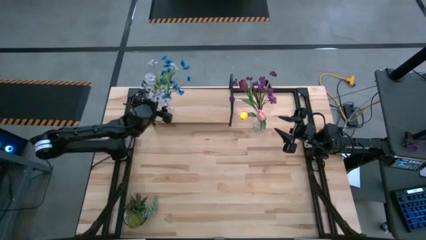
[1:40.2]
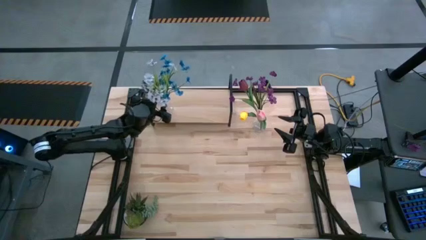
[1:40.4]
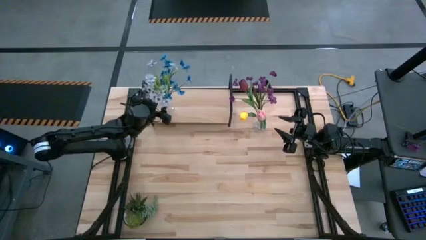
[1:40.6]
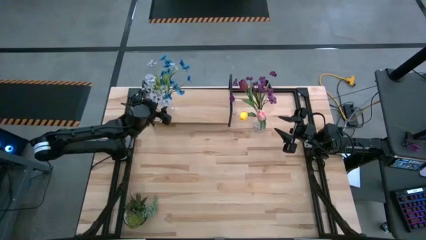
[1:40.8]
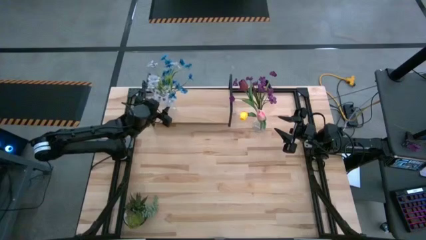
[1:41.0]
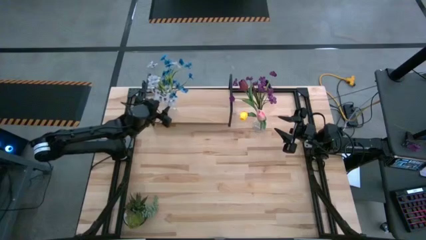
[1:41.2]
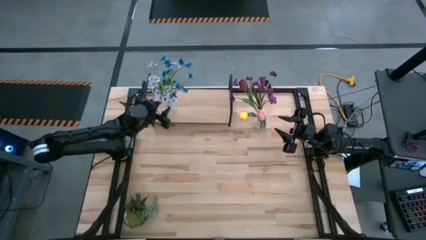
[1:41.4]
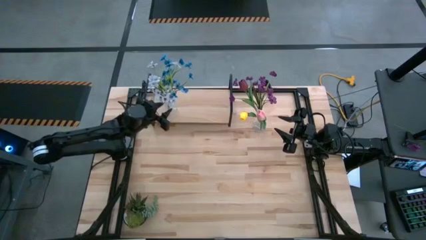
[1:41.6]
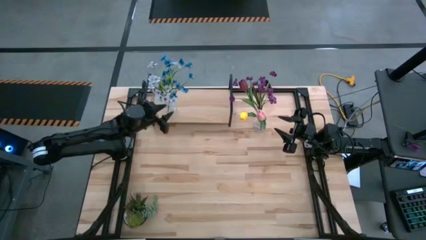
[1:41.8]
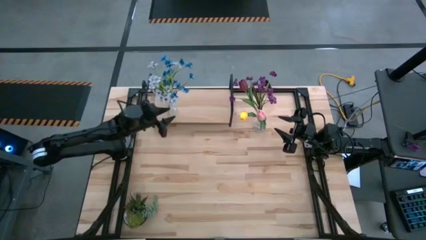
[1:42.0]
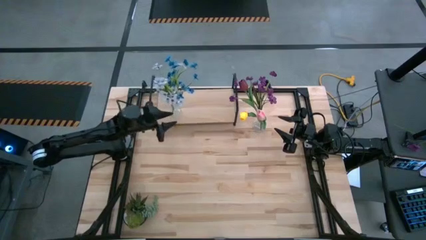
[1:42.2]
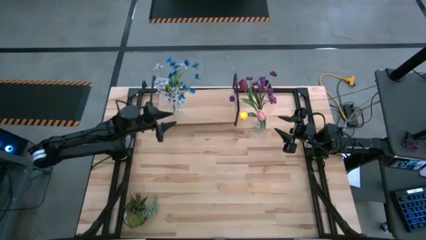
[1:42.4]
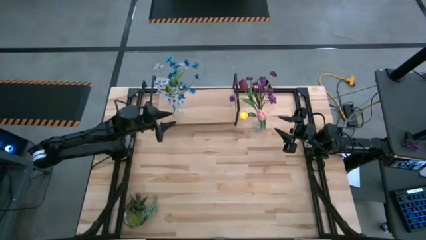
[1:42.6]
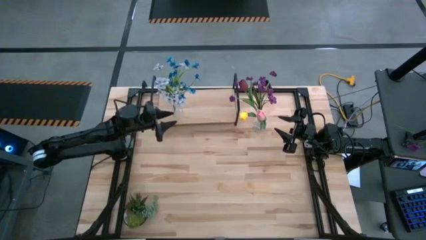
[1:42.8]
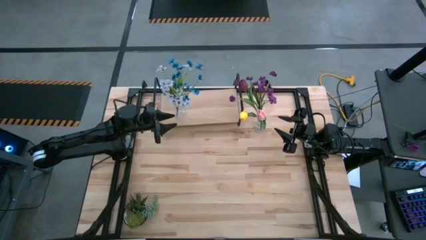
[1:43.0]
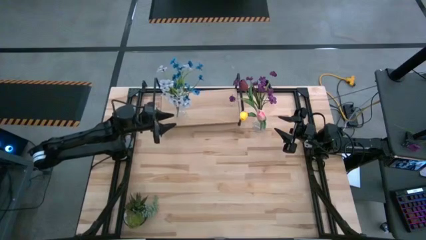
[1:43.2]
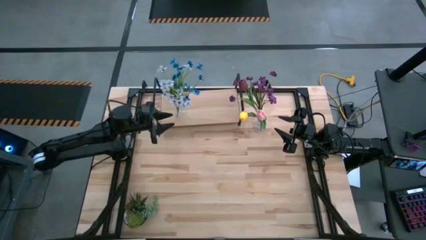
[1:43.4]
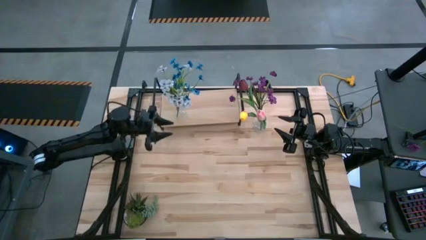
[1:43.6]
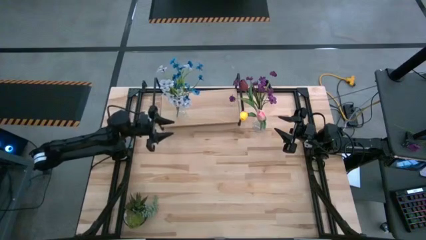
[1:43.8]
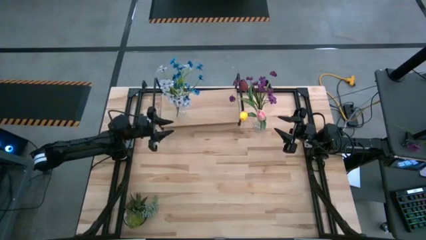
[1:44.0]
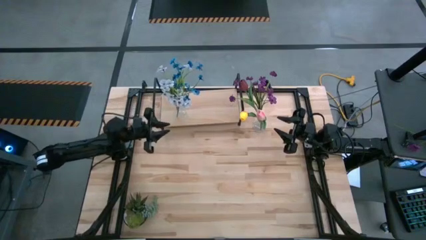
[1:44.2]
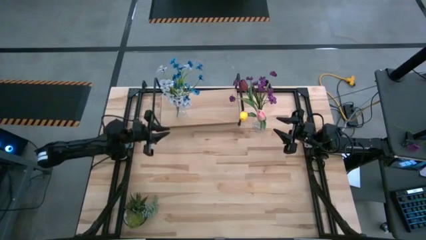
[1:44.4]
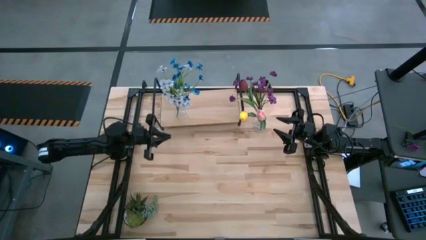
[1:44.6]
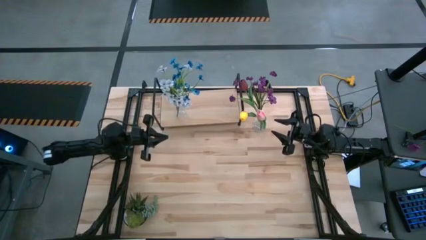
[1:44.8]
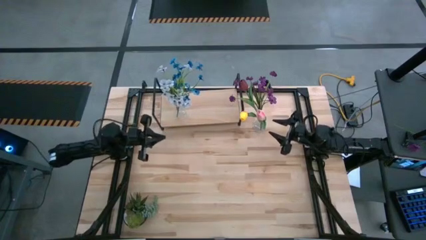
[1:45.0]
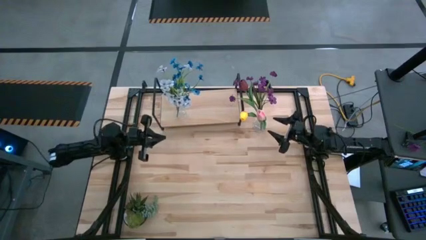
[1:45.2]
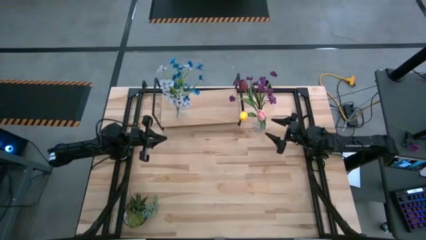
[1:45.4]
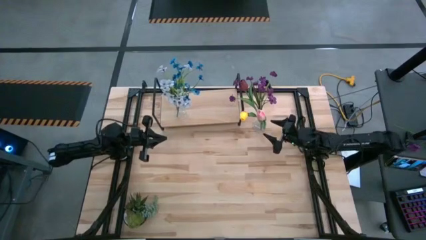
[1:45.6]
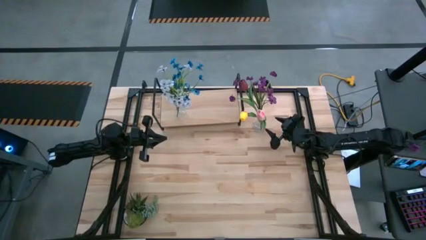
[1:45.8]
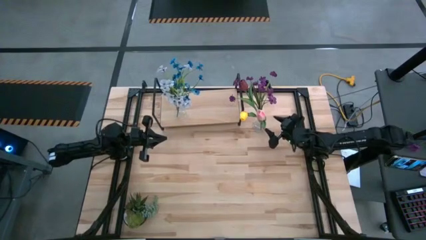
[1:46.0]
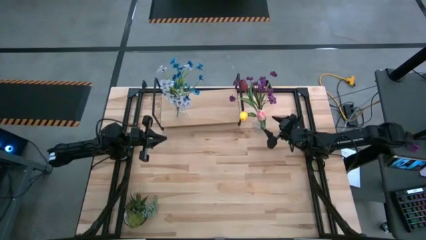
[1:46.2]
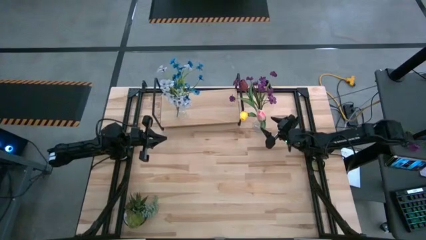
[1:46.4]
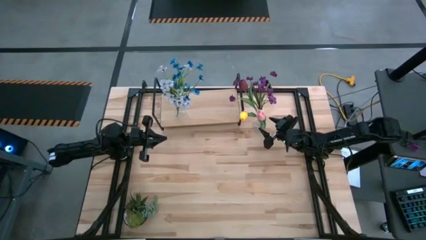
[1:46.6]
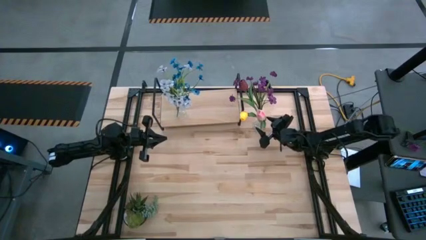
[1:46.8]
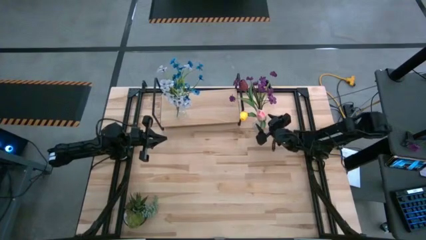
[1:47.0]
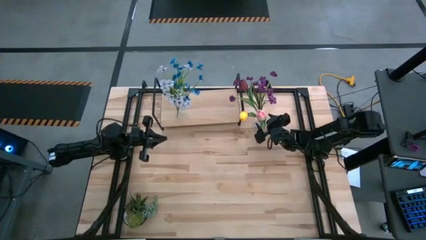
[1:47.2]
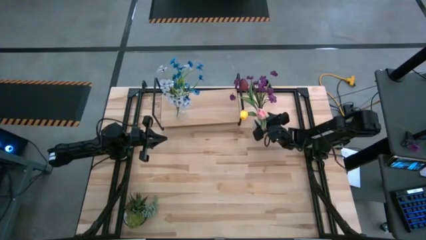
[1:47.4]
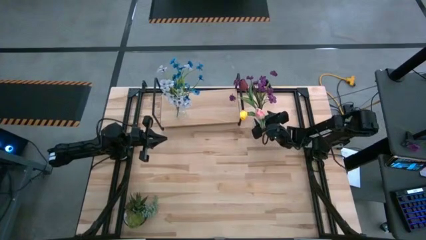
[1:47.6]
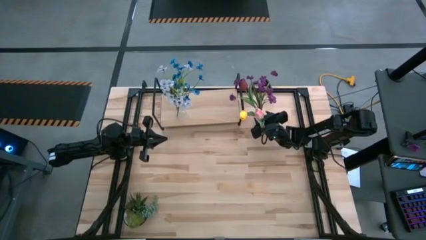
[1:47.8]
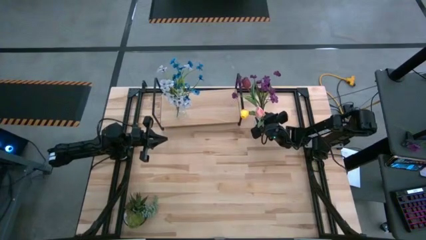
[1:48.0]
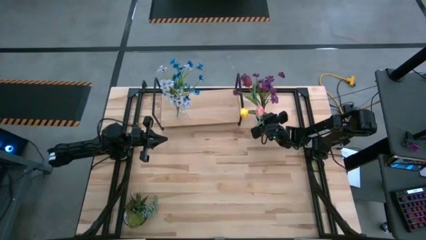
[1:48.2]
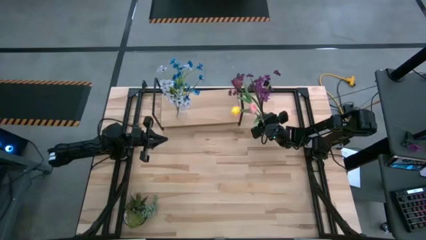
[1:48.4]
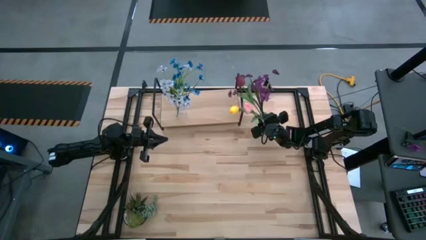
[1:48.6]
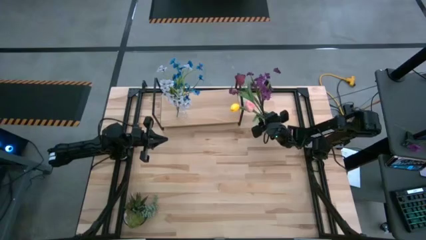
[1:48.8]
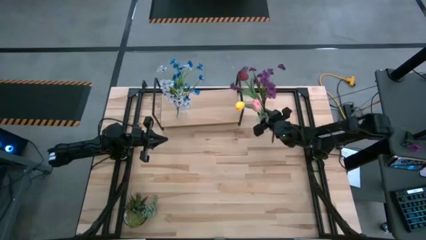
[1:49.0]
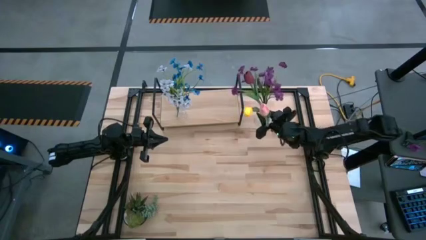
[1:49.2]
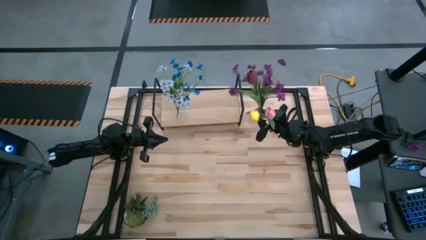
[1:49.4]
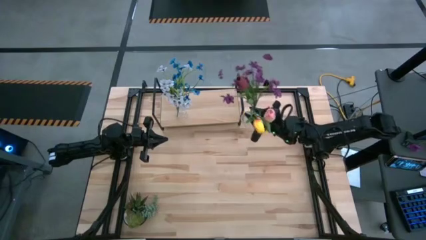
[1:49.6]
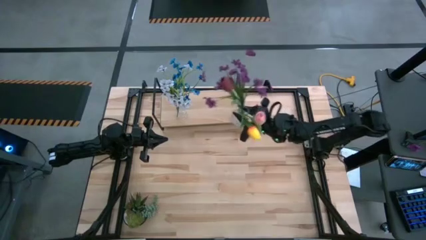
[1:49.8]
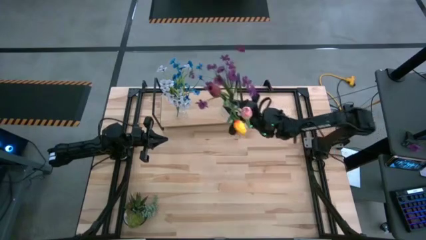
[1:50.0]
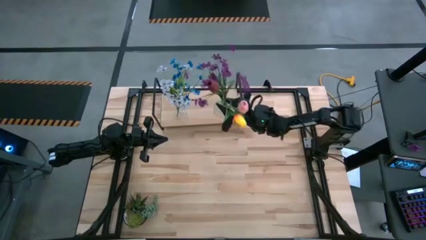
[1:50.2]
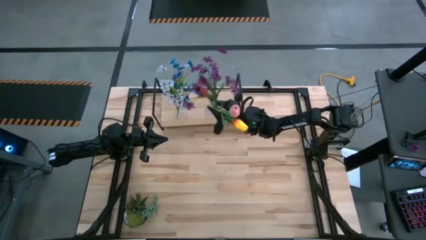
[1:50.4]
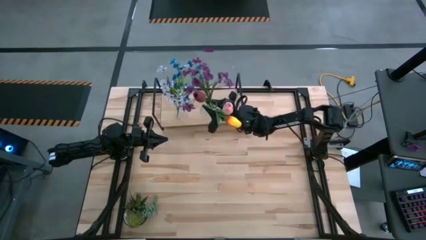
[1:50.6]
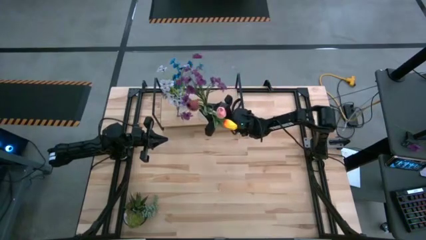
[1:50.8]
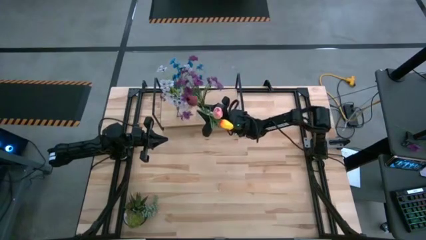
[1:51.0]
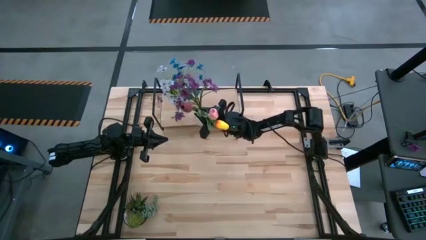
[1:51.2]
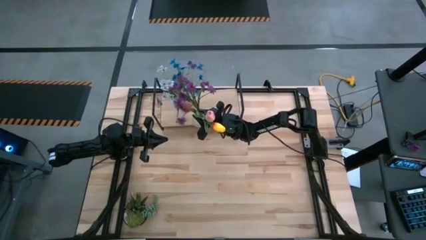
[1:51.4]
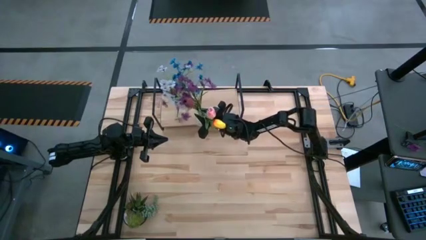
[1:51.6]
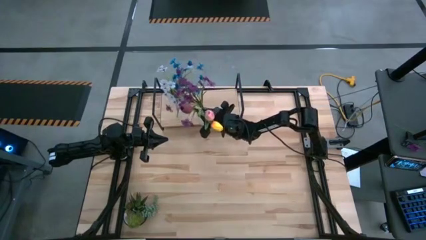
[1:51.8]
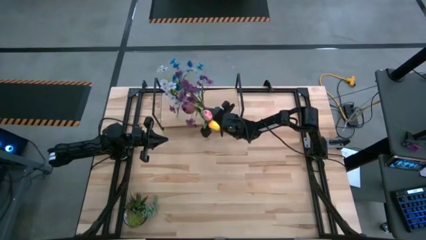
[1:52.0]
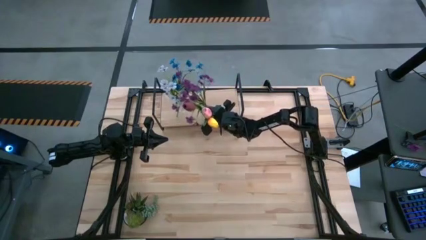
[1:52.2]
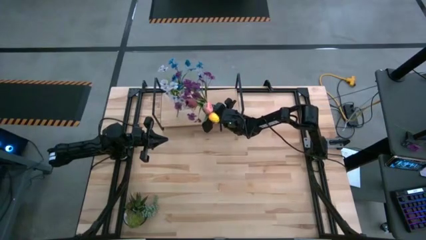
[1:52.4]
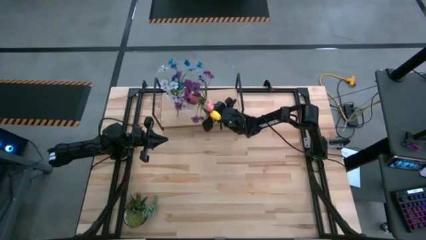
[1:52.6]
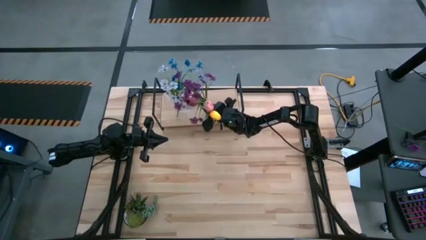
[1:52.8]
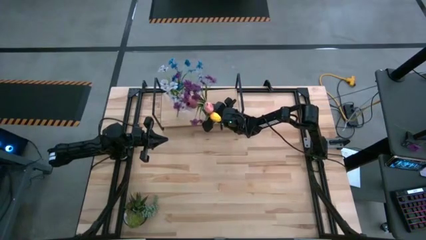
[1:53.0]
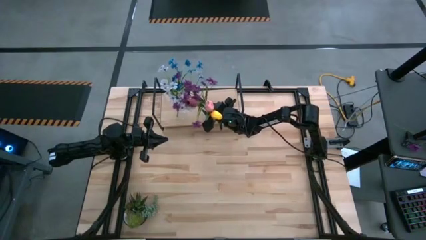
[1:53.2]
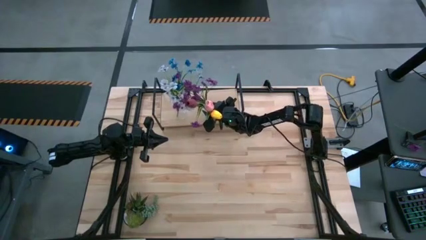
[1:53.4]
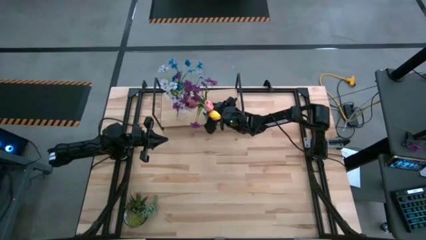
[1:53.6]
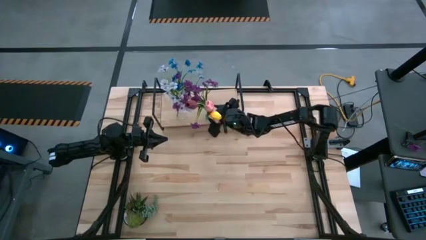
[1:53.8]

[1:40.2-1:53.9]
Task: Pick and place flowers into a vace then onto a shelf
Put the transparent vase on the shelf
